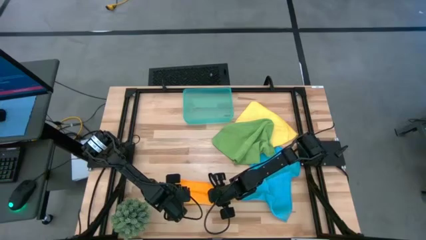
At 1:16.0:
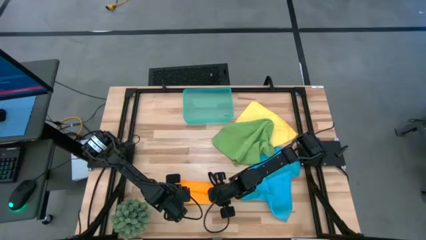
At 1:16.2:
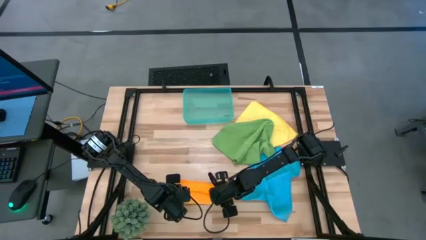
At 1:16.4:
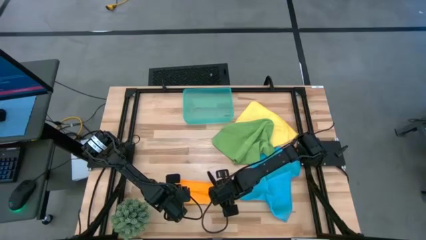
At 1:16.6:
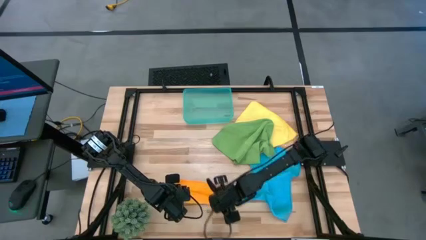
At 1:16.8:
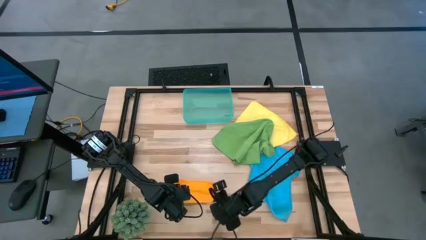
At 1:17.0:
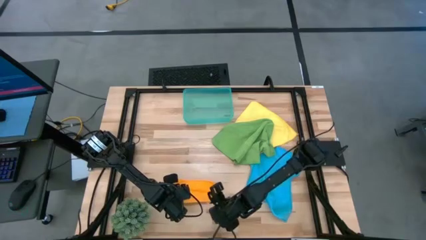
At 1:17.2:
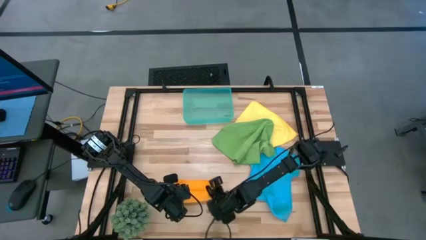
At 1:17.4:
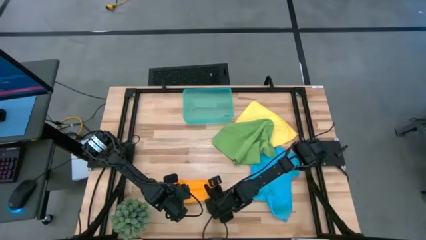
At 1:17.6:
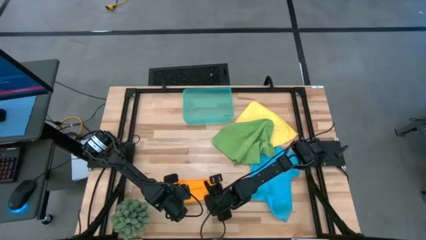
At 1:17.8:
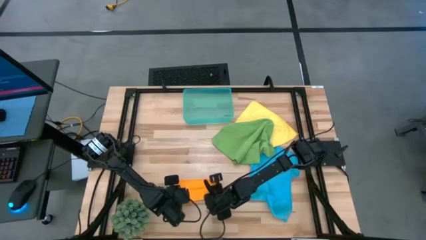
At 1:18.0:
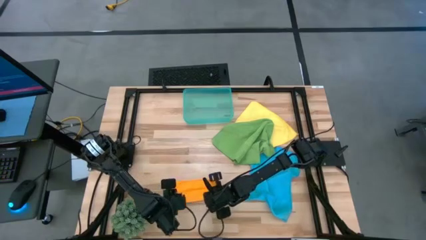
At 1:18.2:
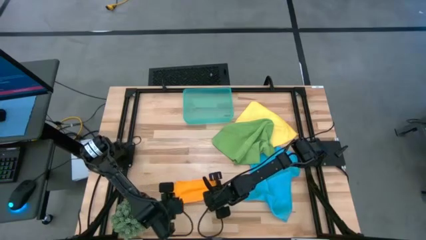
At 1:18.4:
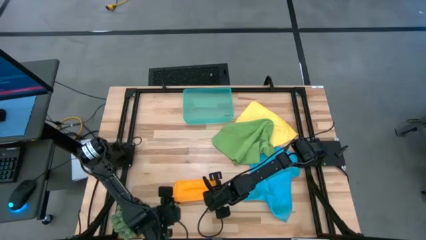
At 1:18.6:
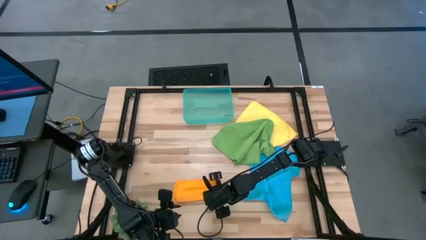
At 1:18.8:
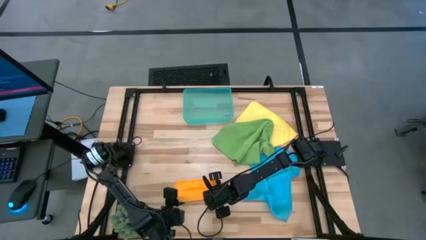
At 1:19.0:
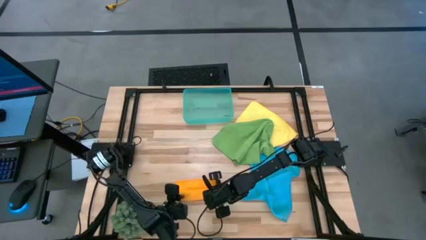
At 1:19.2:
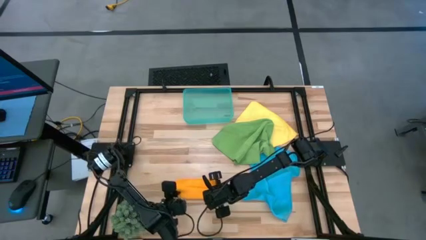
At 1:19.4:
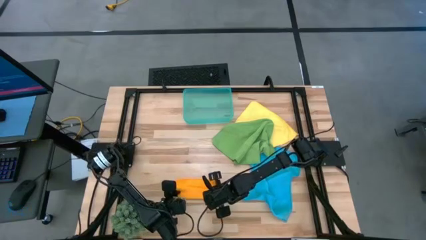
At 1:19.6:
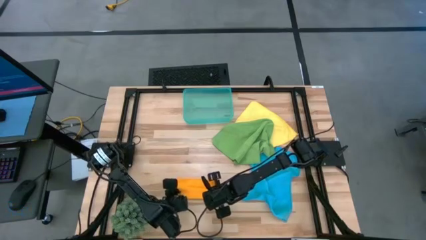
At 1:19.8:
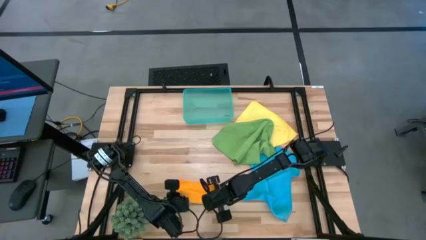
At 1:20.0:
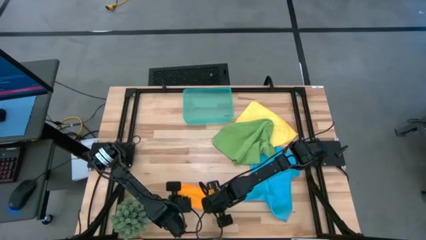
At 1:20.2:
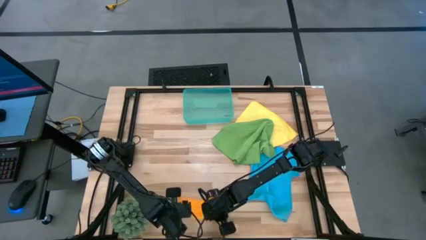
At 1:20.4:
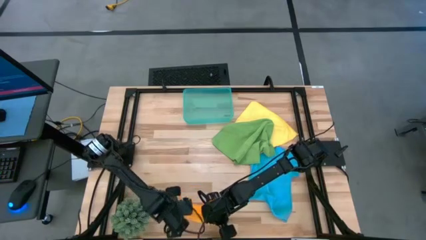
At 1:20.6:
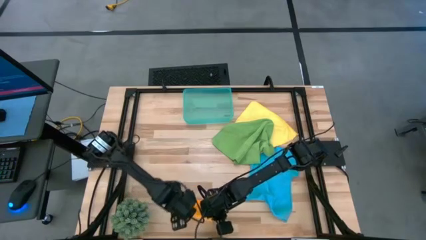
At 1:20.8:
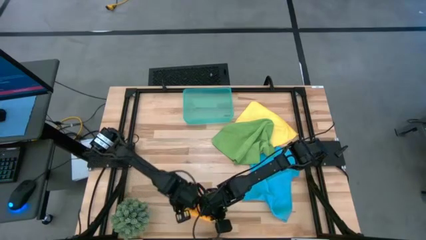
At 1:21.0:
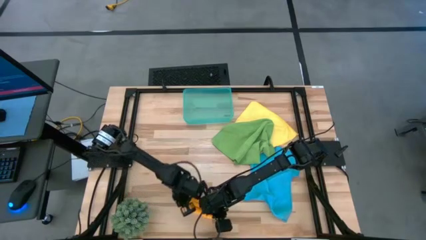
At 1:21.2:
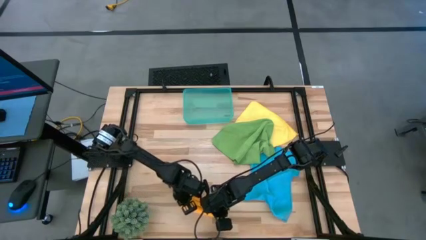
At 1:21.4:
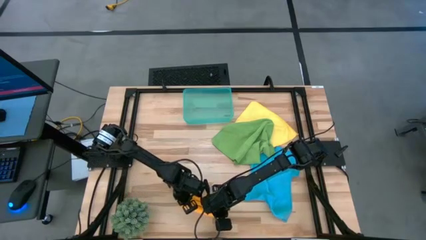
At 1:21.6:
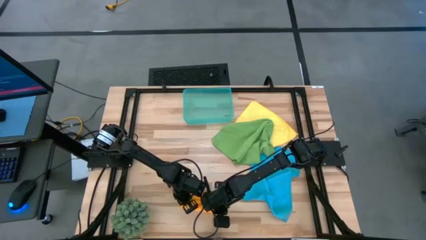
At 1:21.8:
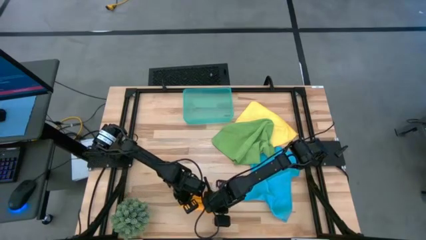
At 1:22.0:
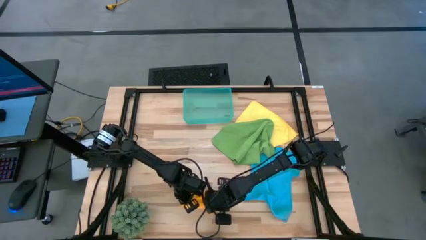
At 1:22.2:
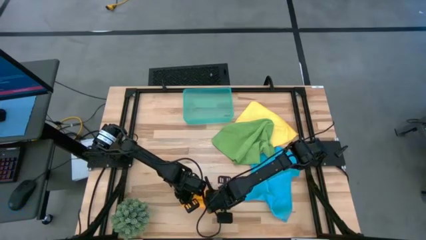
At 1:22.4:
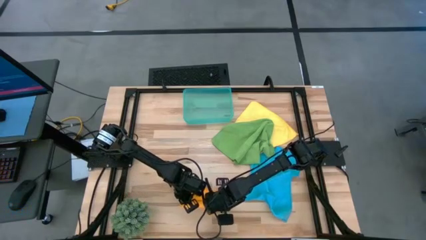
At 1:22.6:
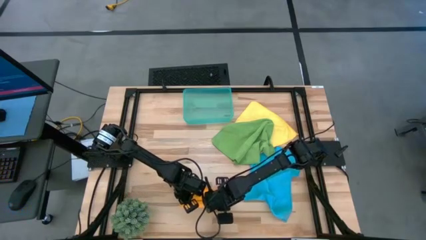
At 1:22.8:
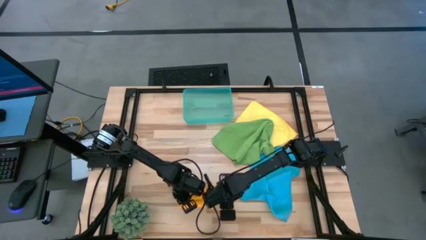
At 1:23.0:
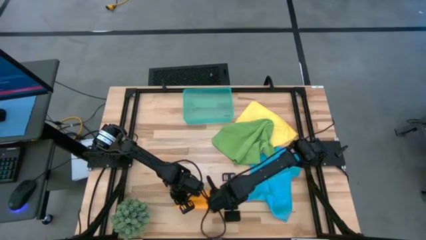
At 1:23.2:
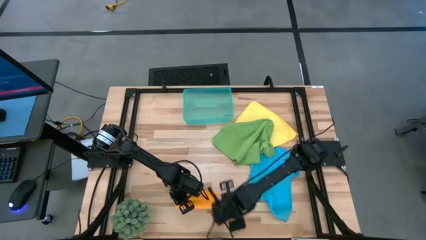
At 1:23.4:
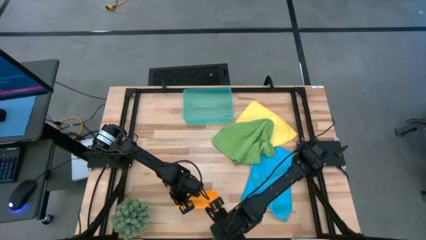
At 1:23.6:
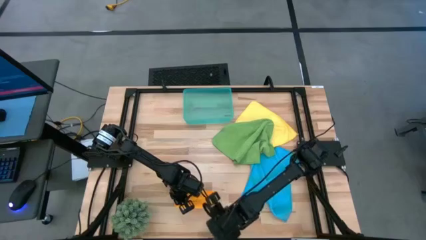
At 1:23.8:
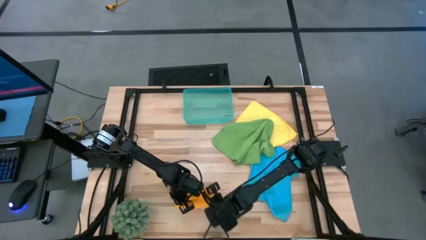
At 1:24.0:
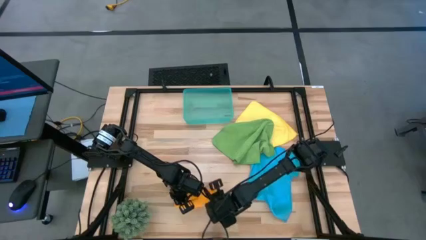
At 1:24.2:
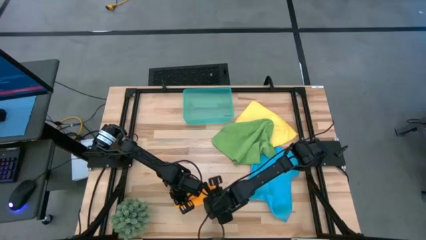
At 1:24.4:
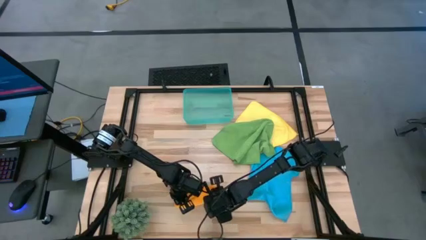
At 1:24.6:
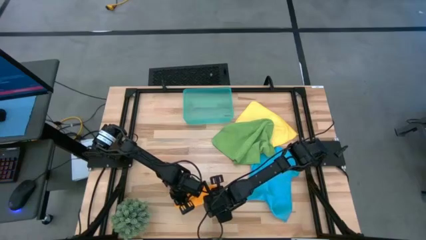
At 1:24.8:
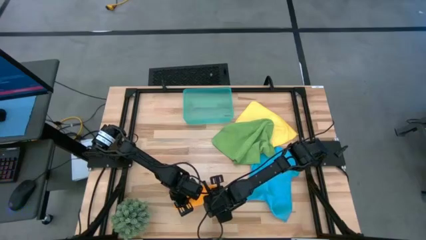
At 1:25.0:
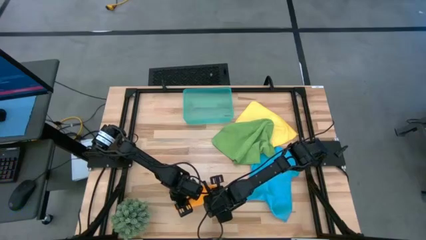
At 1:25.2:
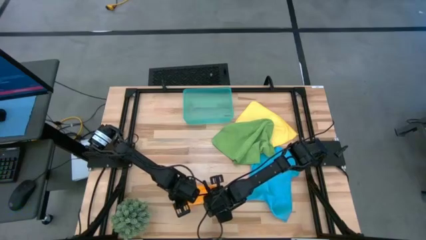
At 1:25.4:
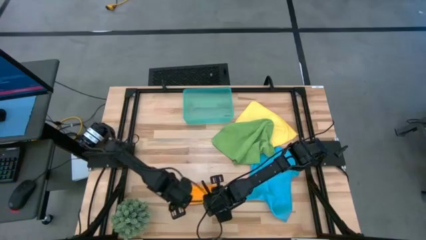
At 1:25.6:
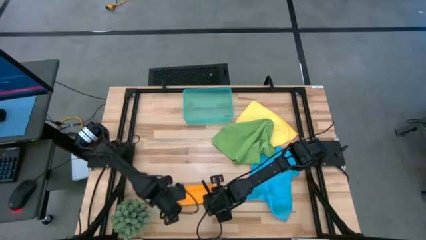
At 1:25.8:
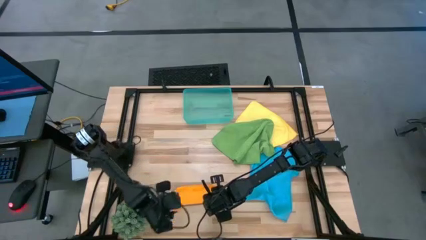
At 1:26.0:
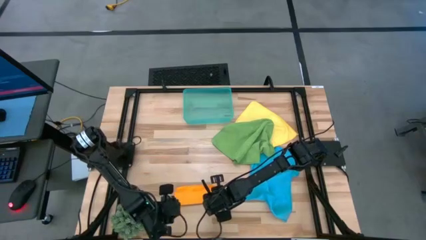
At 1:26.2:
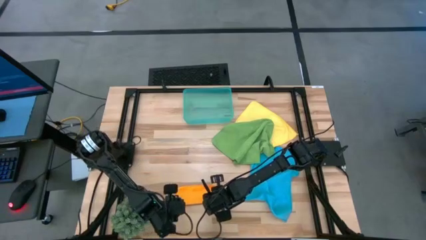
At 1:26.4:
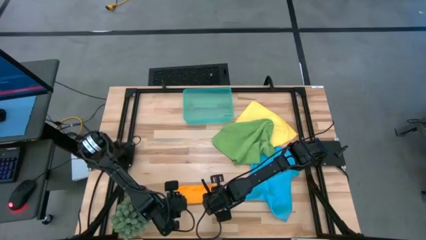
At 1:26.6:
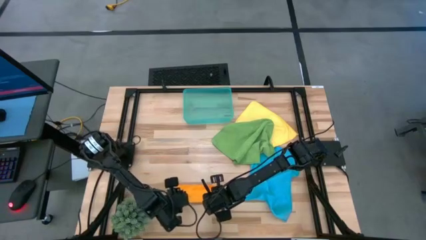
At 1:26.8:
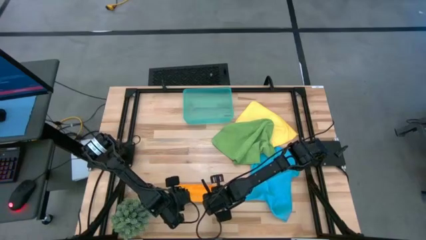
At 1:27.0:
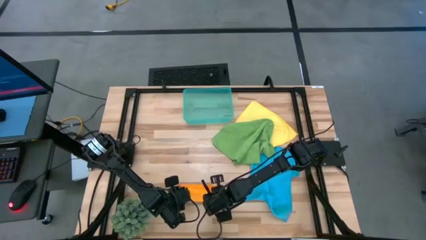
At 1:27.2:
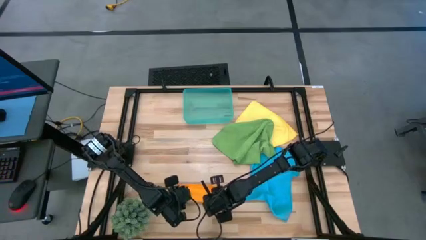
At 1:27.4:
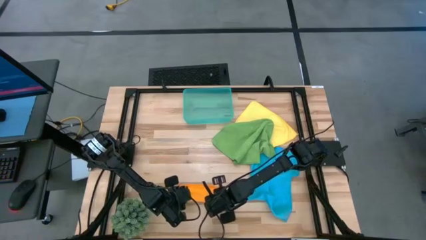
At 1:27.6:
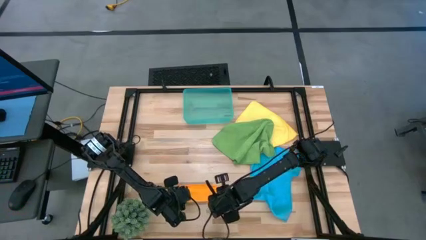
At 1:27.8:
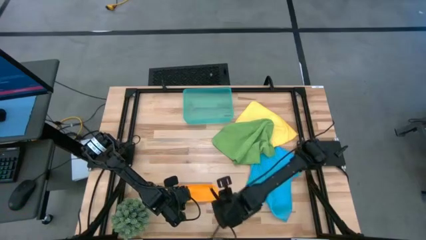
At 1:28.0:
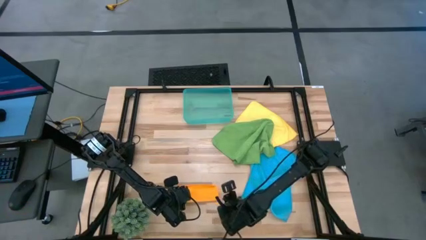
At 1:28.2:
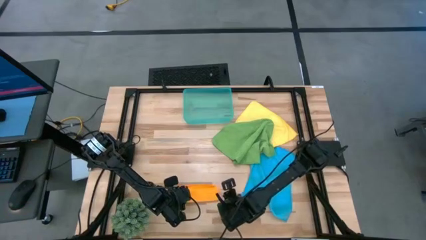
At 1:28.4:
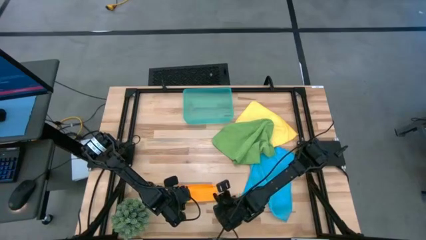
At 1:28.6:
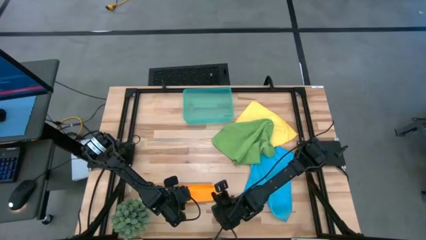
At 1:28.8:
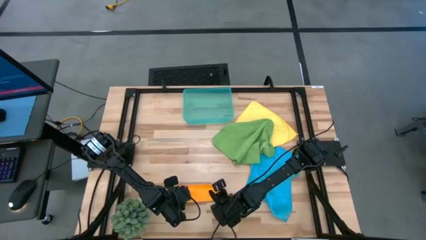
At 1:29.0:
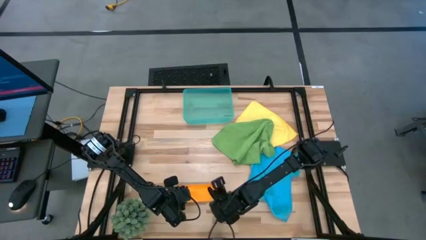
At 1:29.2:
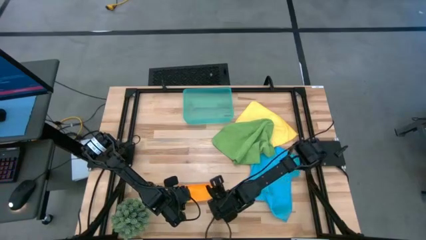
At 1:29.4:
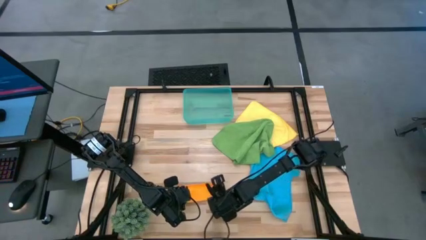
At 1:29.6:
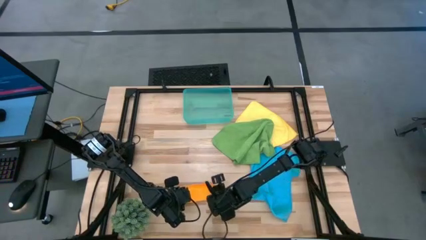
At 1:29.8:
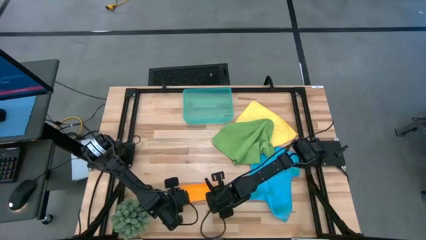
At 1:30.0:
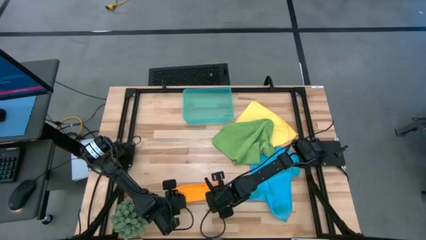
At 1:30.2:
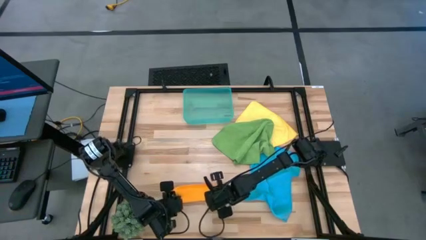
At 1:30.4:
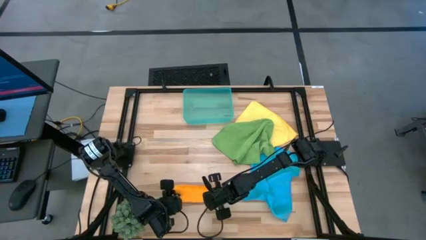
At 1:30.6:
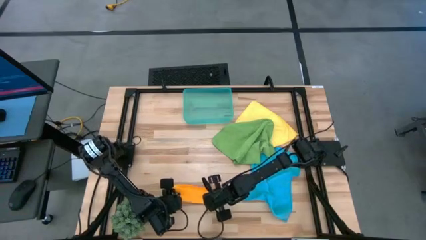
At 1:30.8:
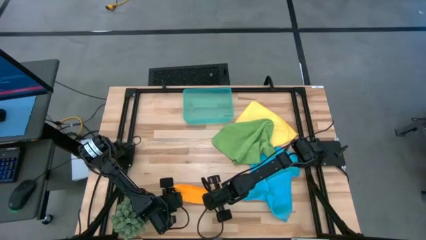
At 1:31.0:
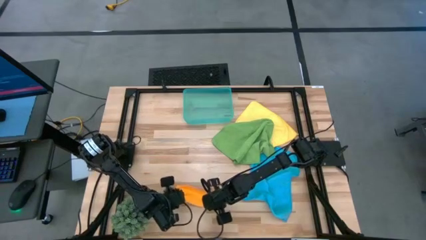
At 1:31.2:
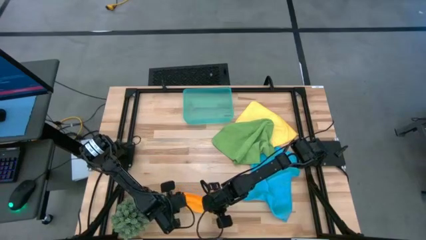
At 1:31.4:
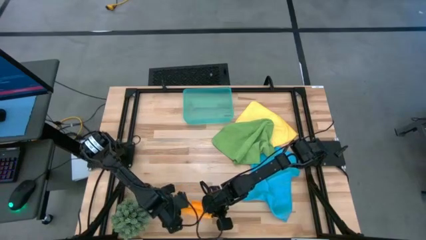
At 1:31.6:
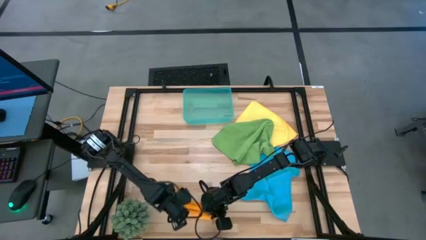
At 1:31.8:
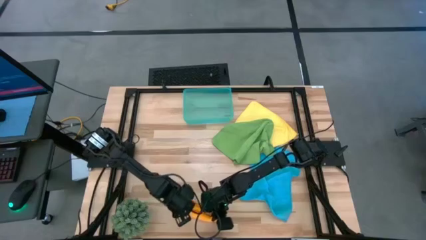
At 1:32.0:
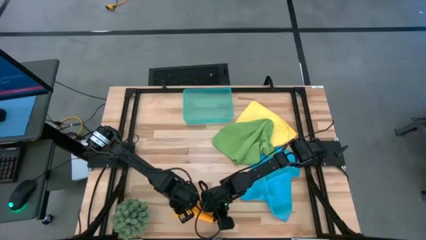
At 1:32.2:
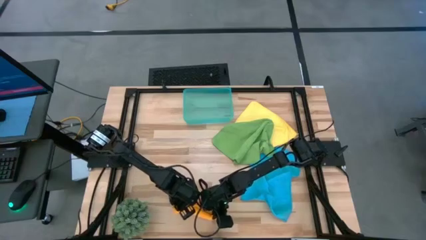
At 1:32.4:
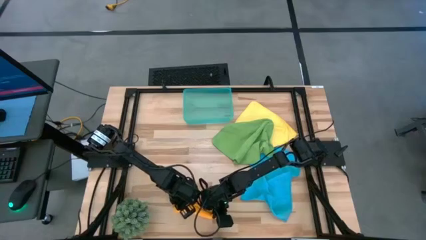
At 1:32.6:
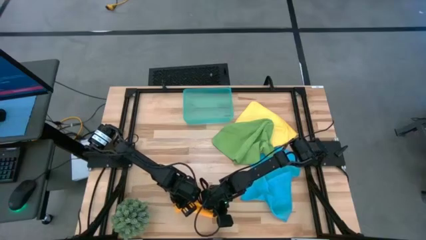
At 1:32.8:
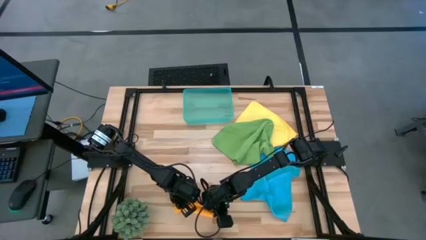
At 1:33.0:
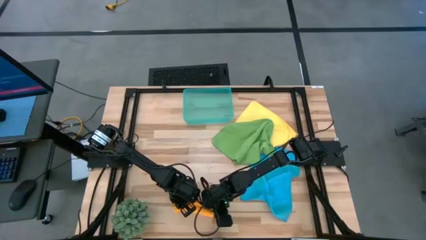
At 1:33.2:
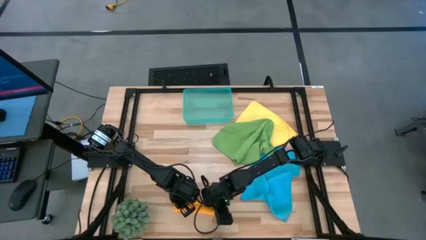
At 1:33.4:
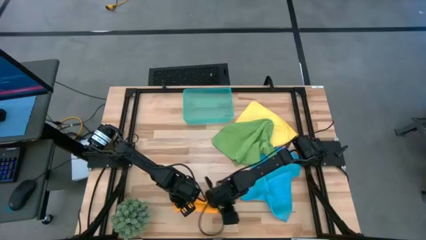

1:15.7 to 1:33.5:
Task: Roll microfiber towels into tight, uniform cylinder then place into a basket
Fold the orange towel
